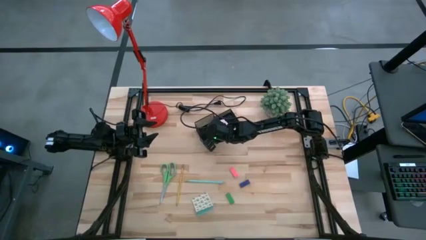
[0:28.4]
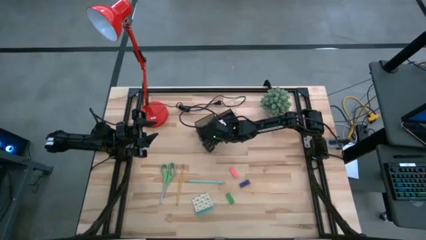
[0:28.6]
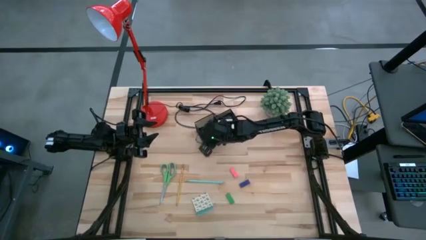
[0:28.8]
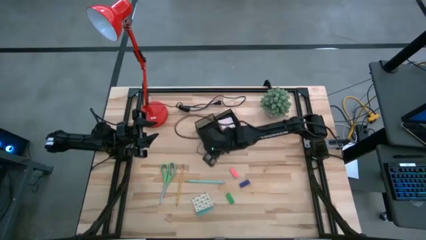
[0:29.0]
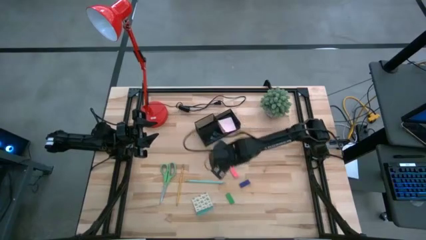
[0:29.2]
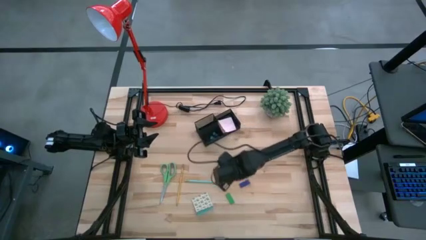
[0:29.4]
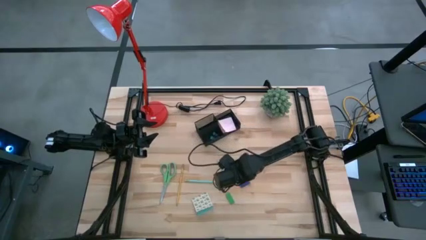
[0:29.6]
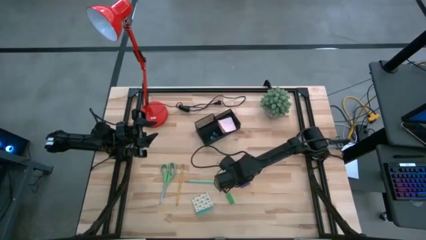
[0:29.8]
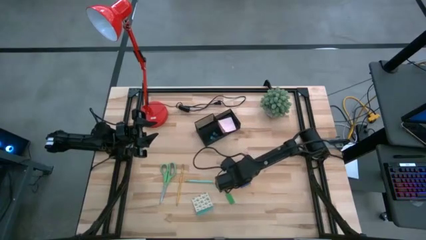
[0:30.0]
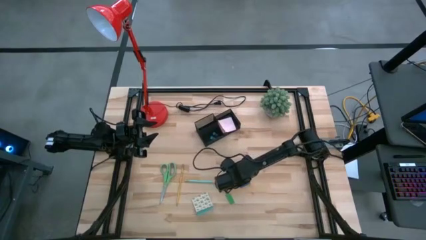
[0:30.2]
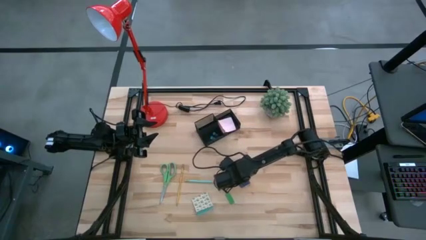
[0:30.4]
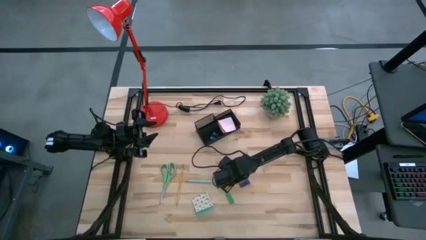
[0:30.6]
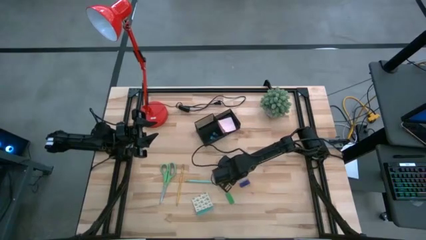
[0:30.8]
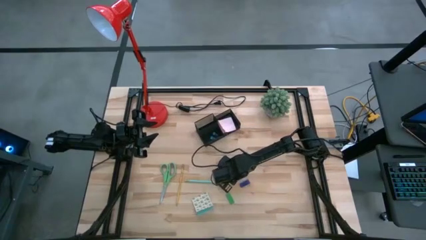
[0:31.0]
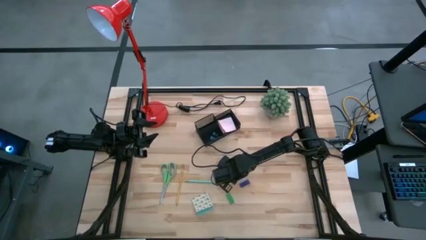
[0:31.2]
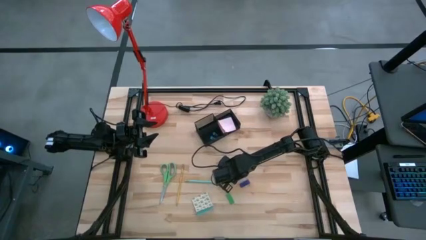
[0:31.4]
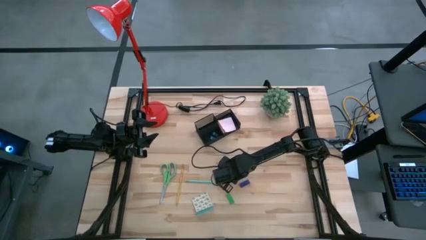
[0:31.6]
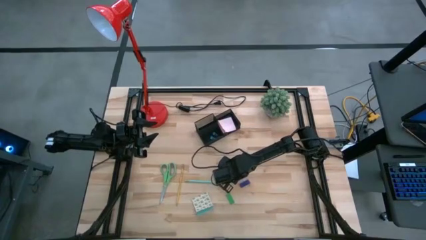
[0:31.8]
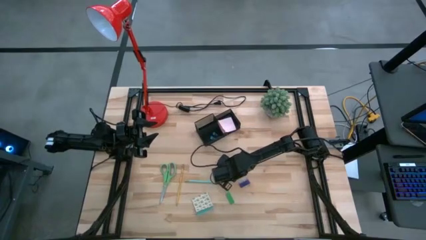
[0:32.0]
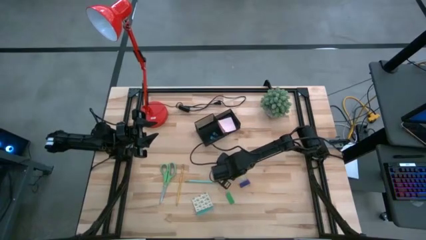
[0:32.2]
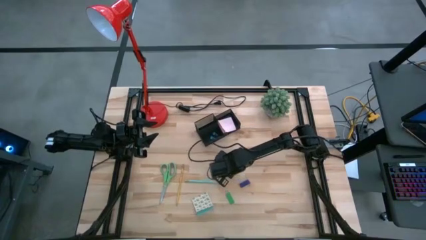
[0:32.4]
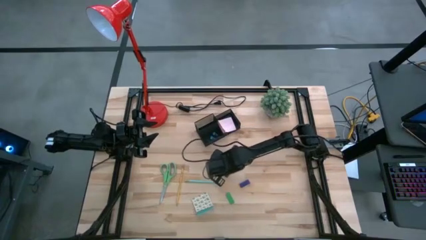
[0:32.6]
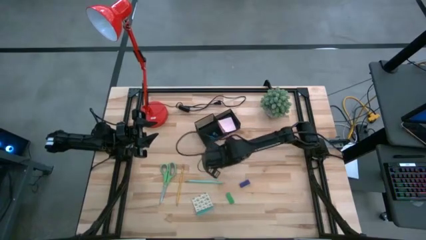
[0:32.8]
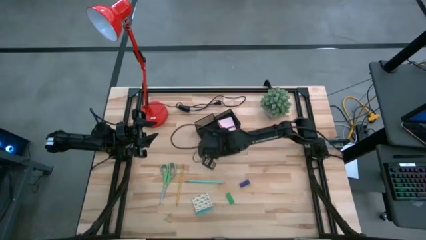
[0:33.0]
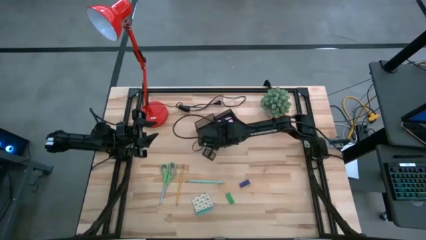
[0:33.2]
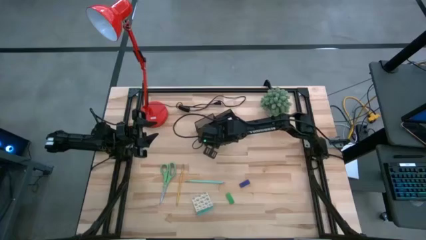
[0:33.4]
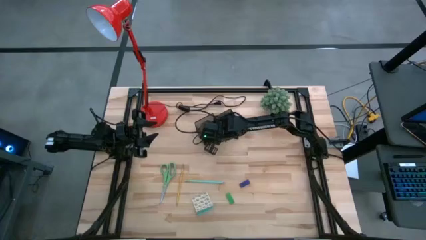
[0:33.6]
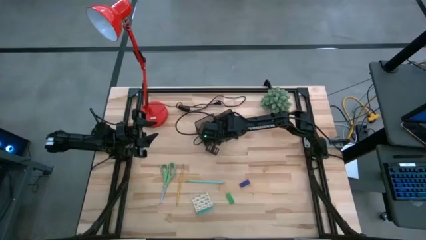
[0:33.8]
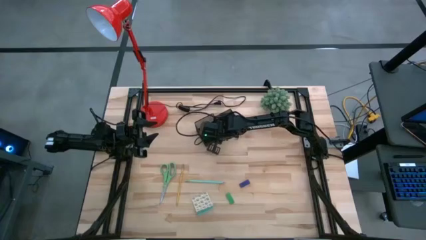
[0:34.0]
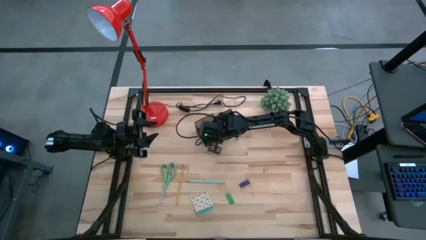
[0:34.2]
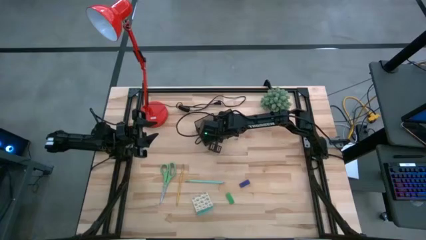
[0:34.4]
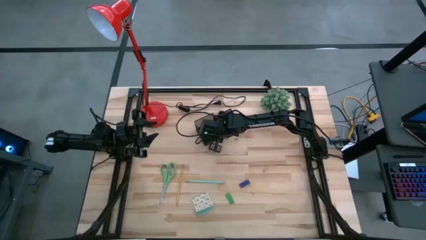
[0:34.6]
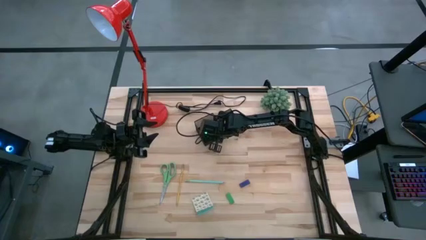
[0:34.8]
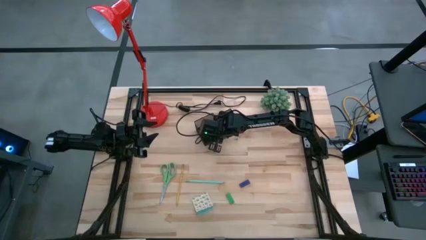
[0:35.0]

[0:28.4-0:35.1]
Task: Pick and place office supplies into organizer
Put the pink eraser into the desk organizer

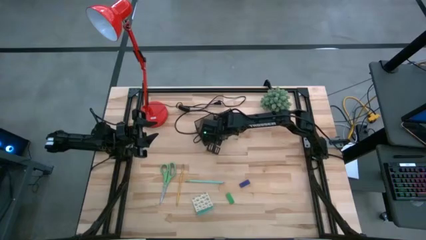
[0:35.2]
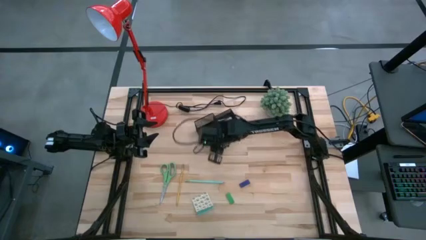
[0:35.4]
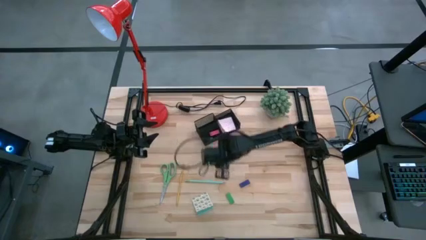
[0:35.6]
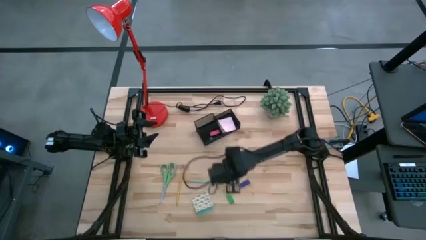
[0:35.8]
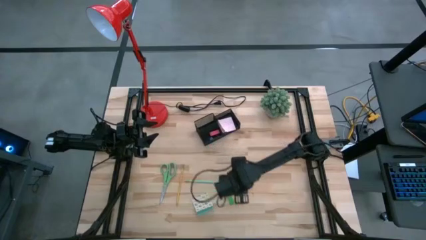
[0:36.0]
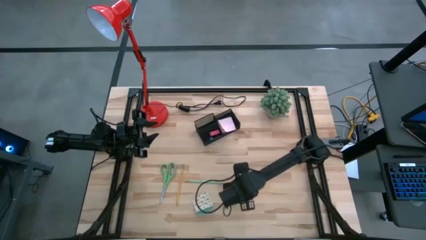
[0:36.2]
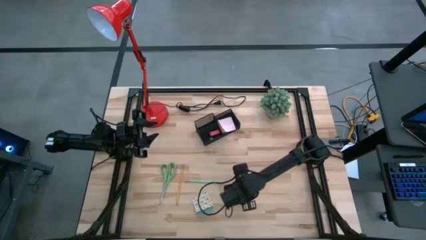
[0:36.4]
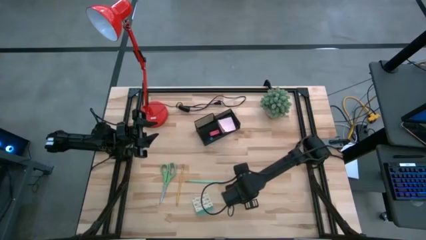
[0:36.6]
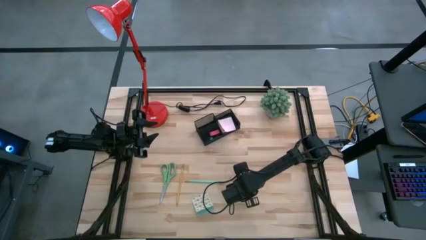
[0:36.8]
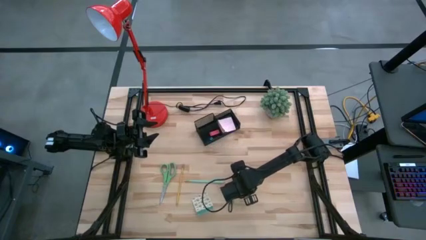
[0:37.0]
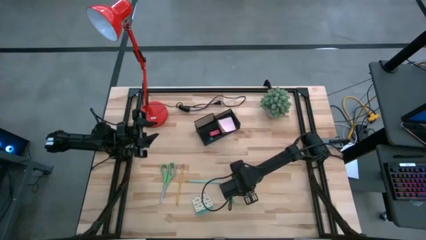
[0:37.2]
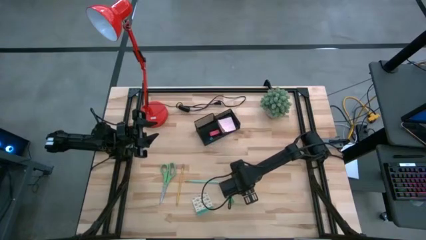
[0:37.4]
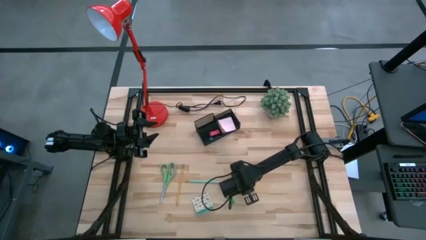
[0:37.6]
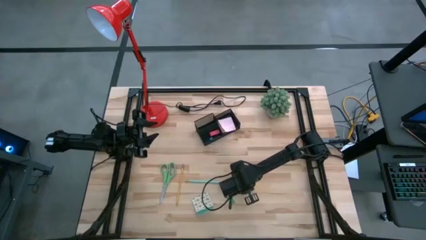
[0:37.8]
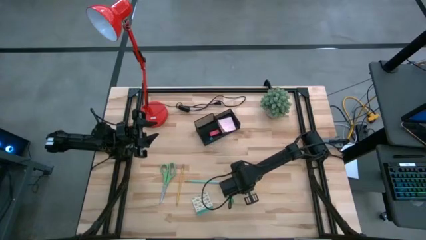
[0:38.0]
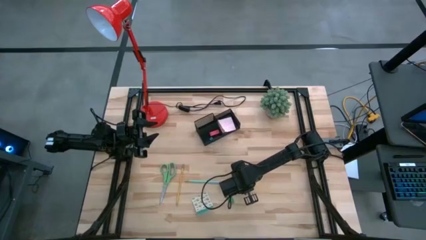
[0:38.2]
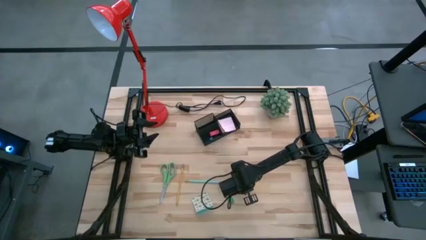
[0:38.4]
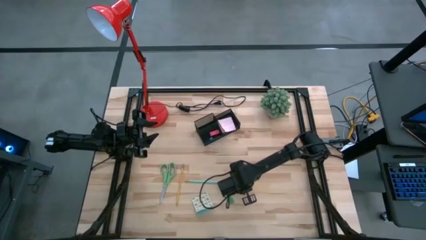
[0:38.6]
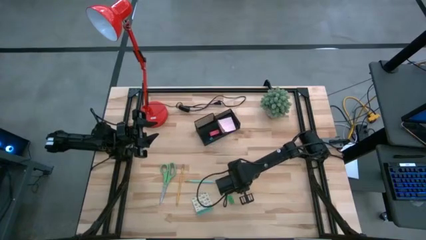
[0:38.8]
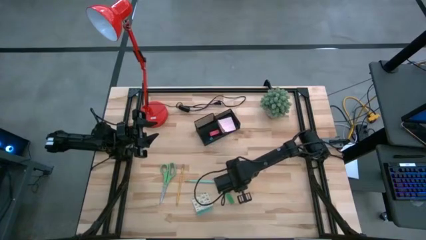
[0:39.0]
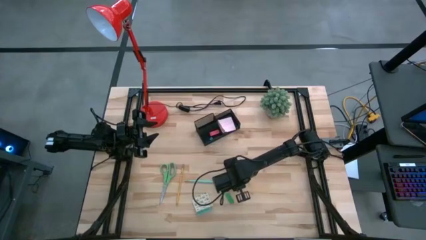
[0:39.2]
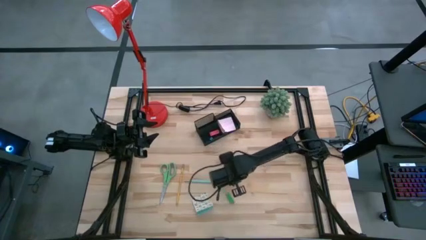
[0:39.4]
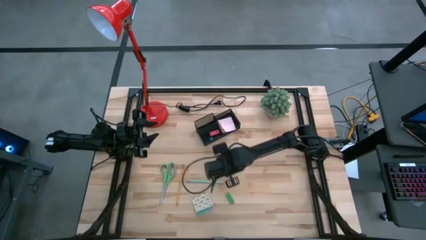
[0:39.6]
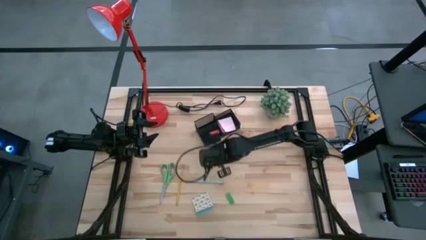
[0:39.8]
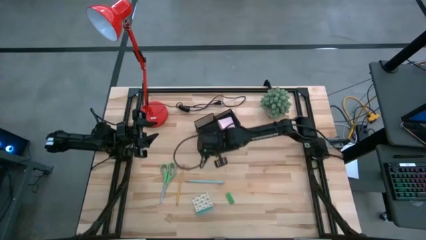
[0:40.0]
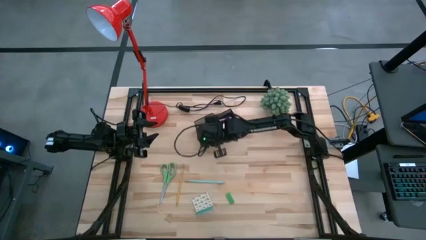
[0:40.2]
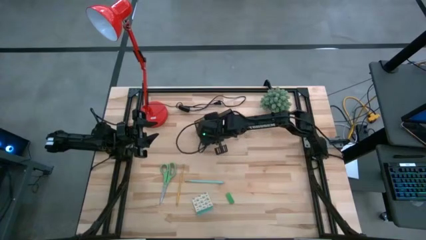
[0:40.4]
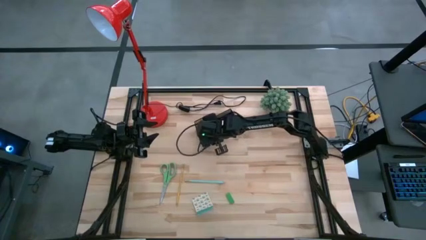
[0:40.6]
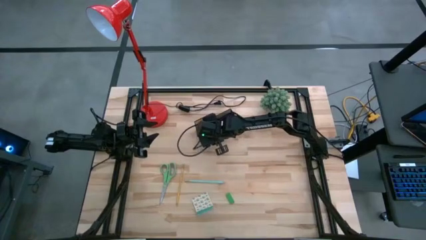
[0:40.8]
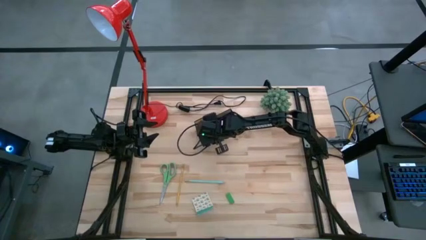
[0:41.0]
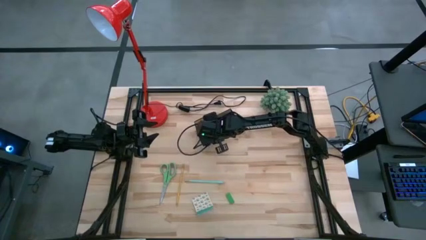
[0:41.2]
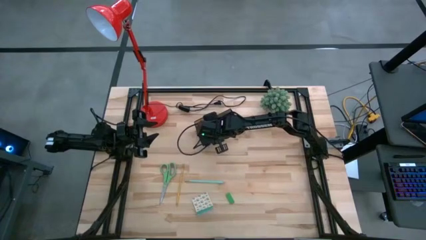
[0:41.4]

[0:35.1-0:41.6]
Put the blue eraser into the desk organizer

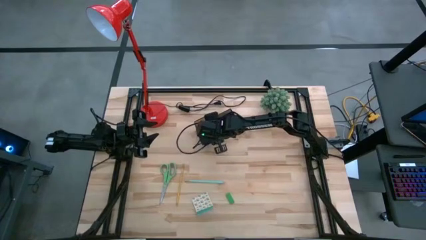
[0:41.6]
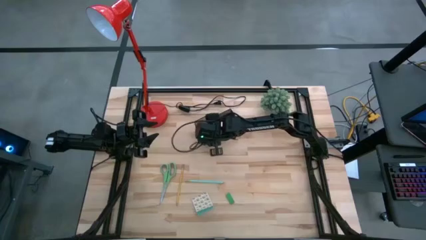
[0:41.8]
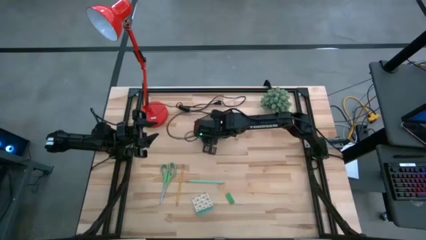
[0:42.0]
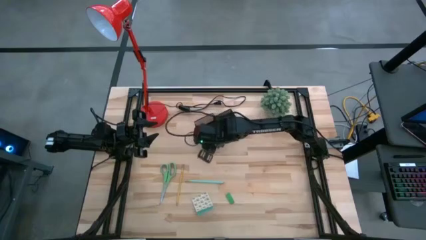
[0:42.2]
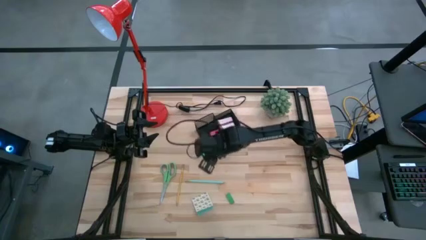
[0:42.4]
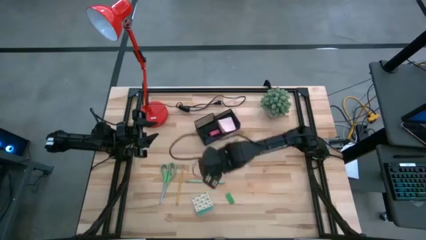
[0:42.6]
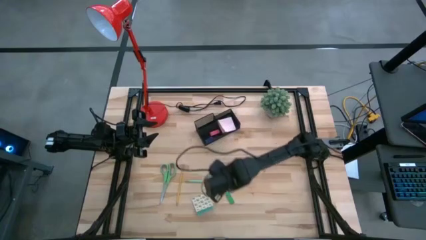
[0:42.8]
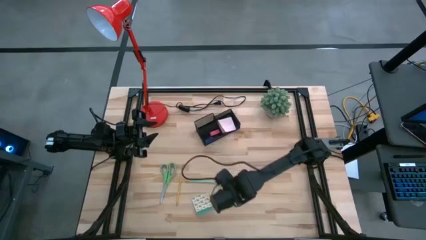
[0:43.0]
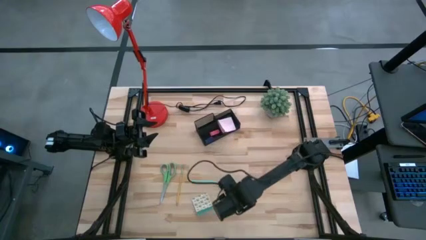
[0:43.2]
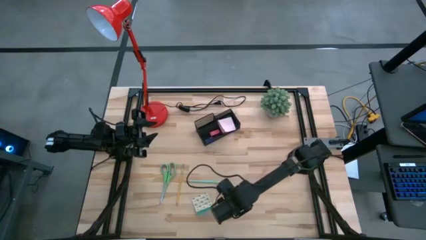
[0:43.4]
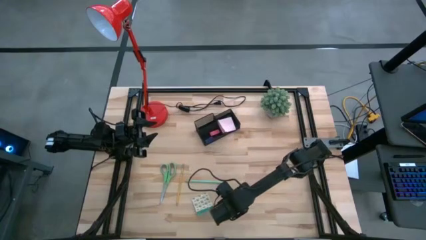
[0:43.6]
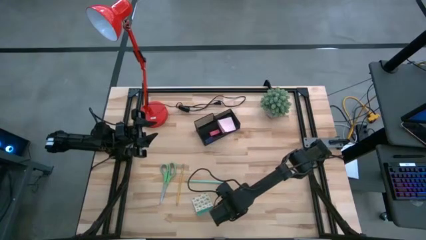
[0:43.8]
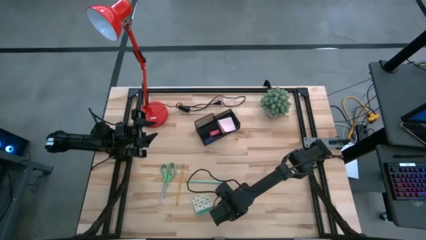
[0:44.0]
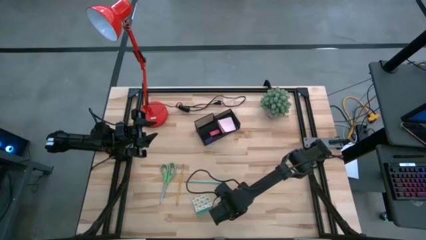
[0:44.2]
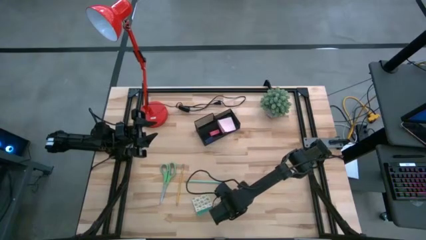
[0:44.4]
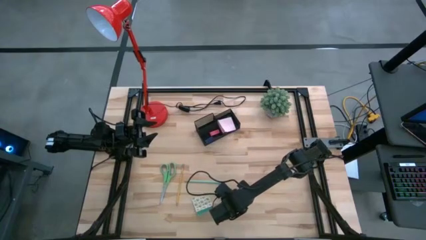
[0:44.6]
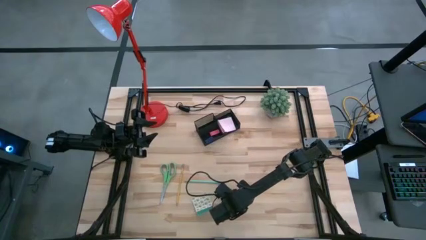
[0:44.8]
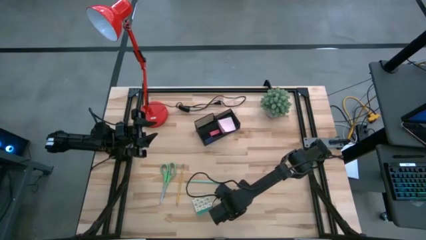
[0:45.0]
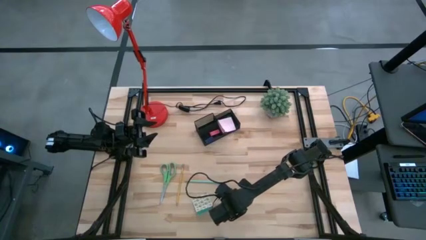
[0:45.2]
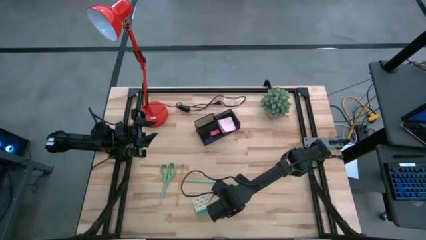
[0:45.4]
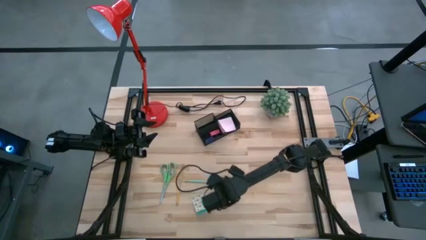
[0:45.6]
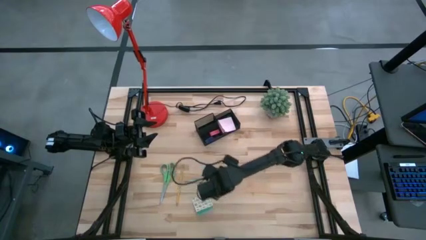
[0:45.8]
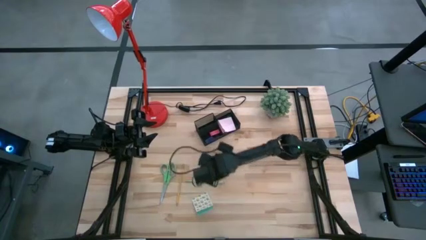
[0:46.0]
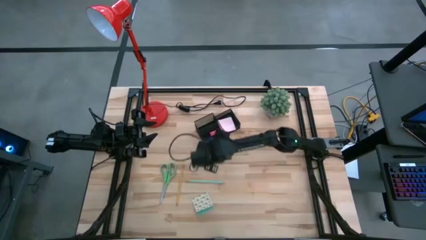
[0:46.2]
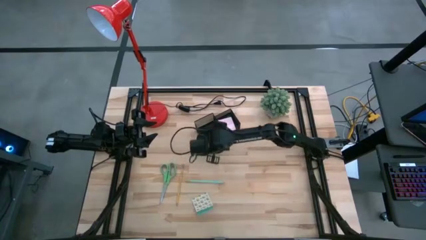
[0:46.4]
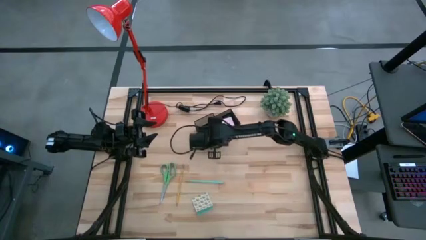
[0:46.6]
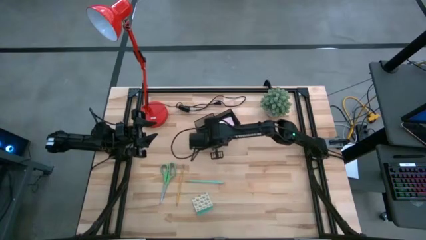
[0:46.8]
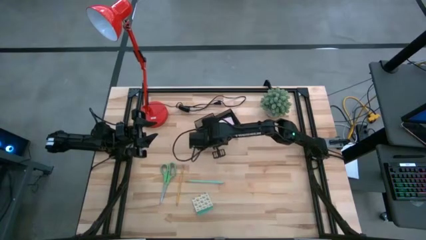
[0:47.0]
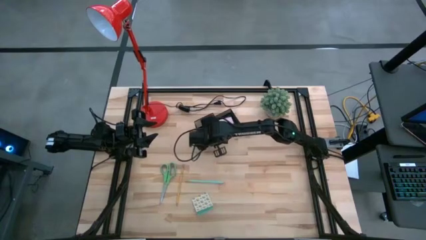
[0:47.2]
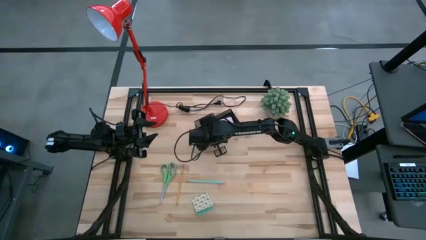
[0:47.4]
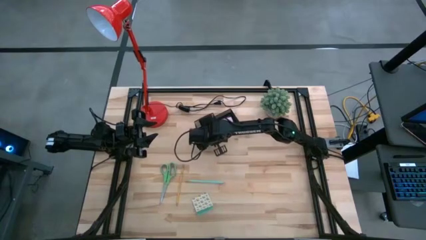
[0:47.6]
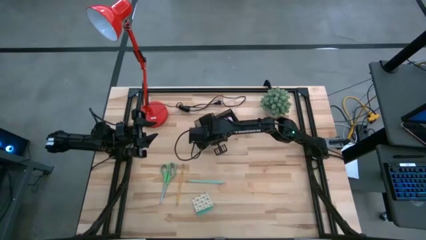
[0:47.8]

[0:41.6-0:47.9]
Put the green eraser into the desk organizer
